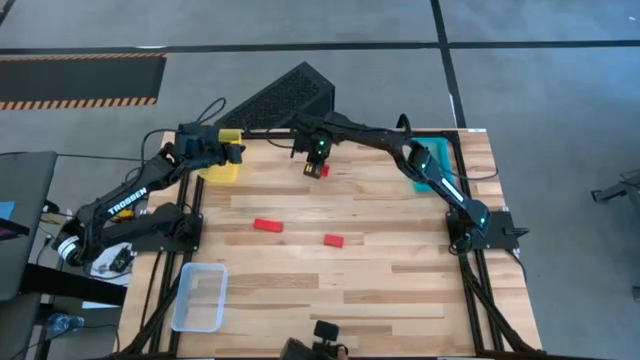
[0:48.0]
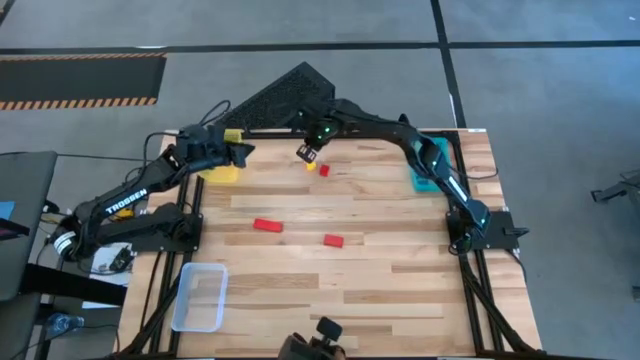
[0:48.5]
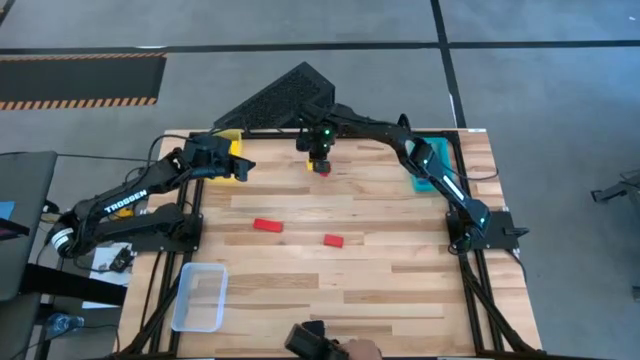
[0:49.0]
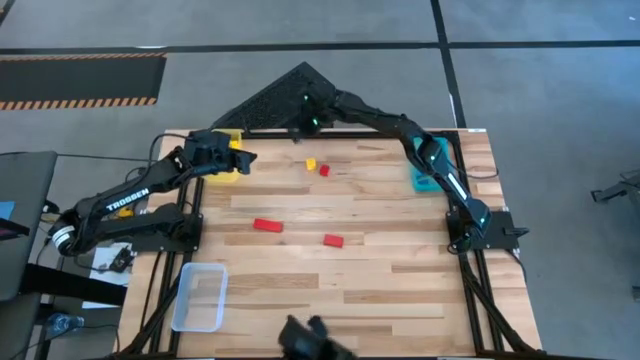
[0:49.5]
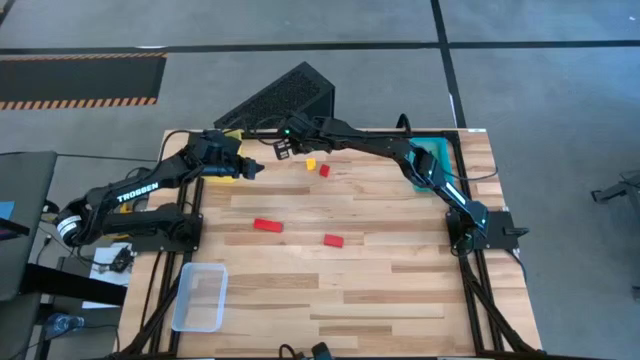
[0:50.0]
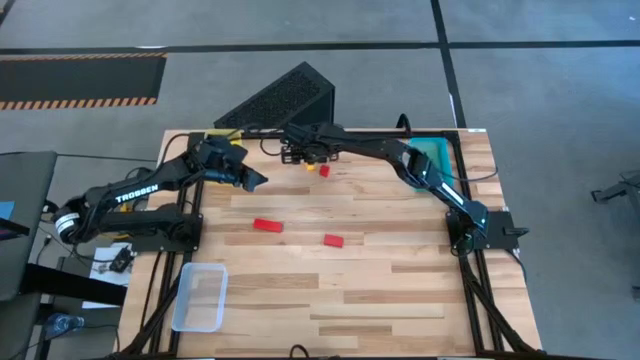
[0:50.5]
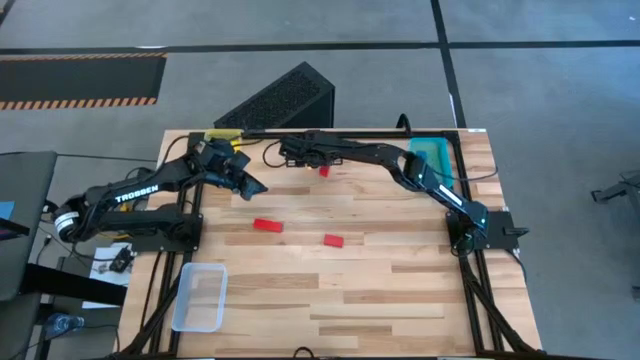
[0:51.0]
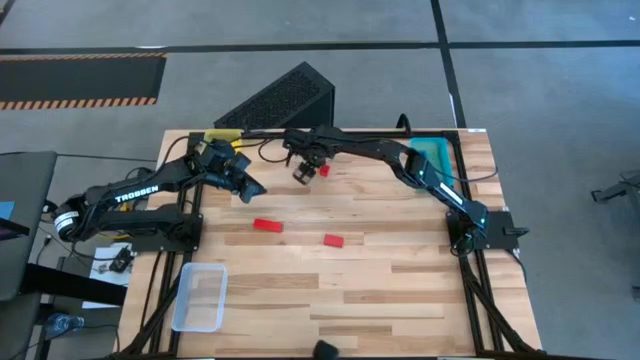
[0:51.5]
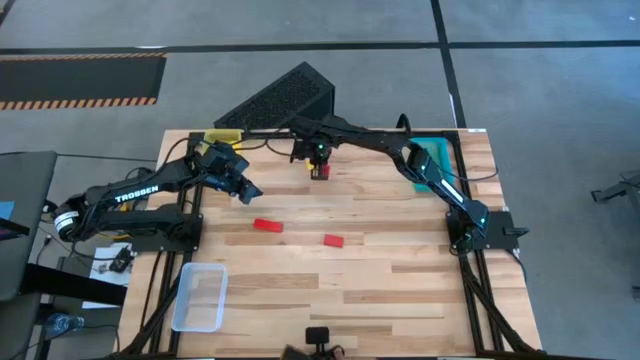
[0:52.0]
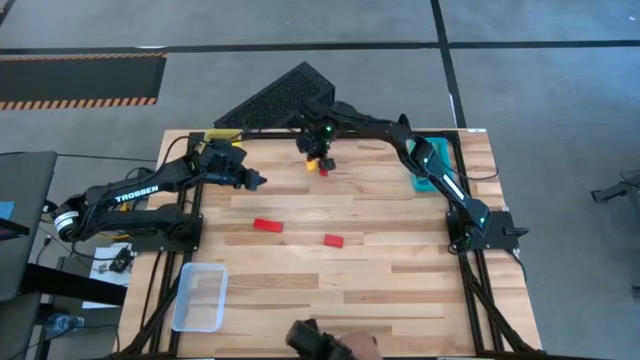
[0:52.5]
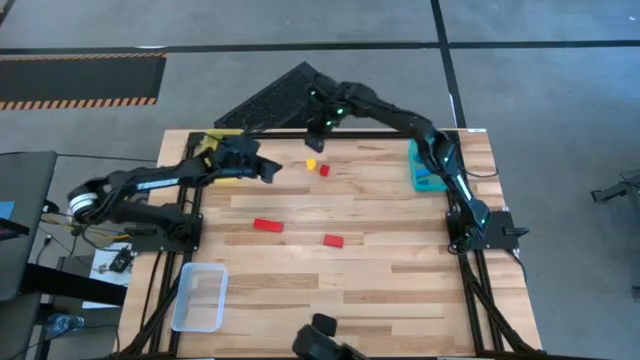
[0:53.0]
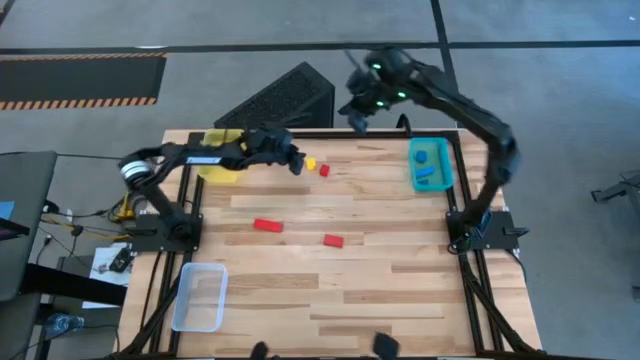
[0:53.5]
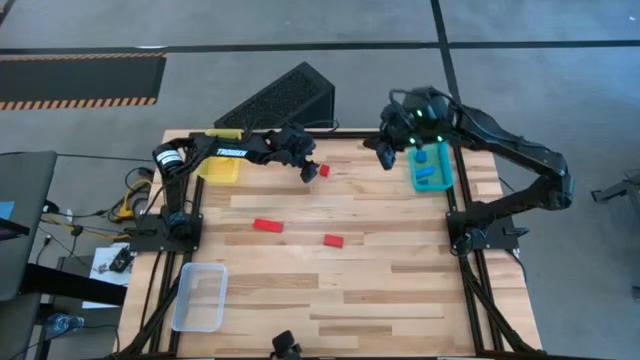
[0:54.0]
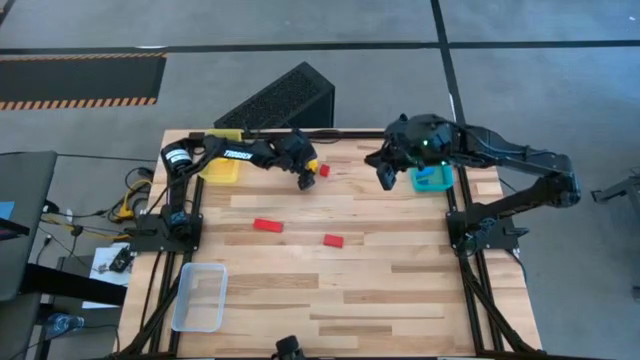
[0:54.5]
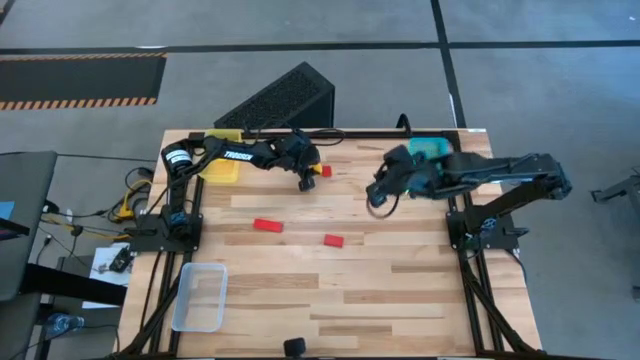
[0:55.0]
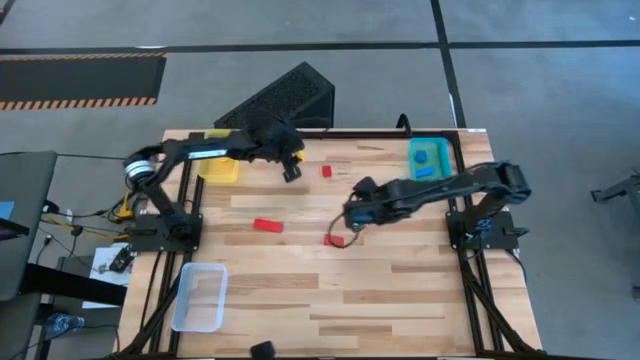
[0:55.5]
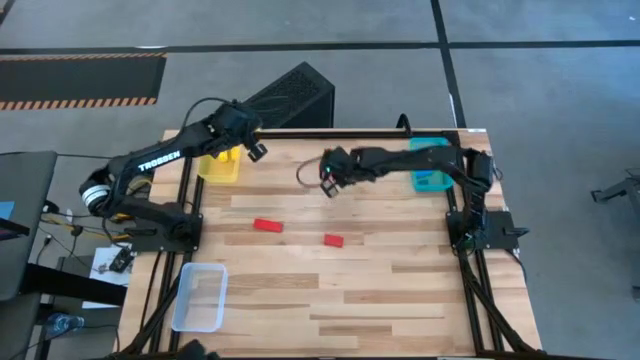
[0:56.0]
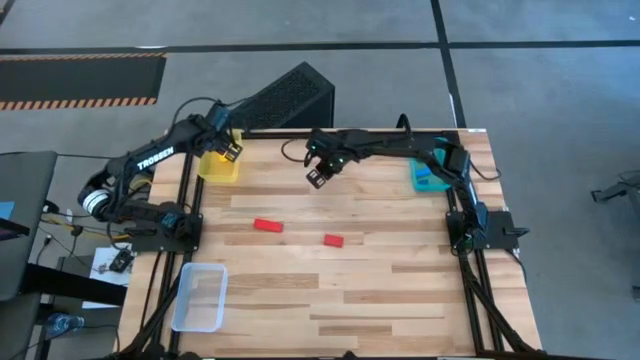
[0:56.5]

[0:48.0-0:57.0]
Task: Sort & place blocks by color
Put the yellow square wooden block into the yellow bin

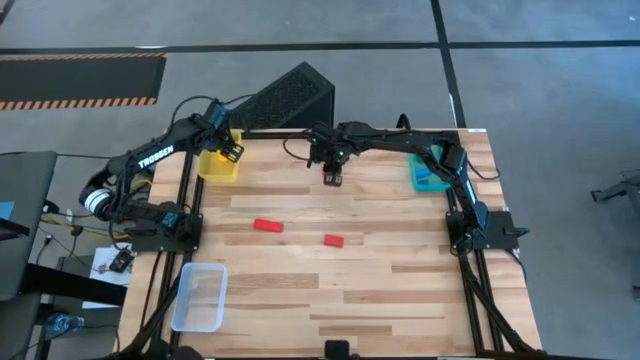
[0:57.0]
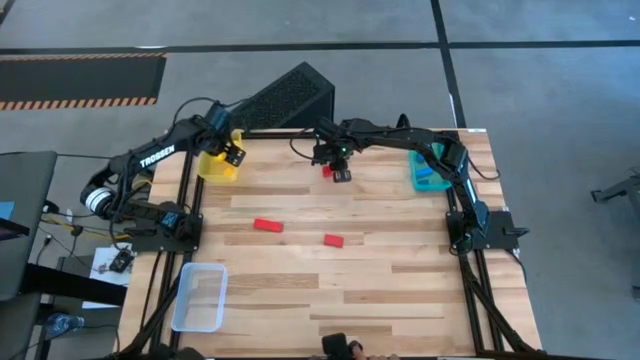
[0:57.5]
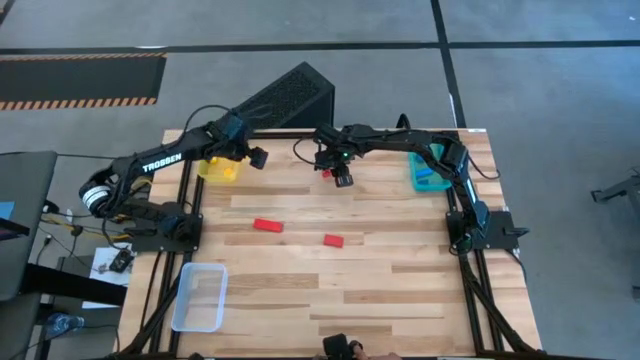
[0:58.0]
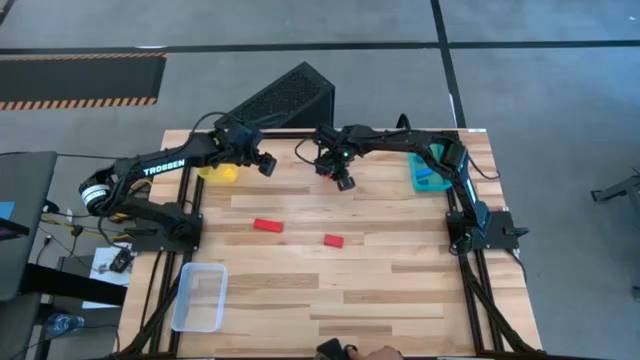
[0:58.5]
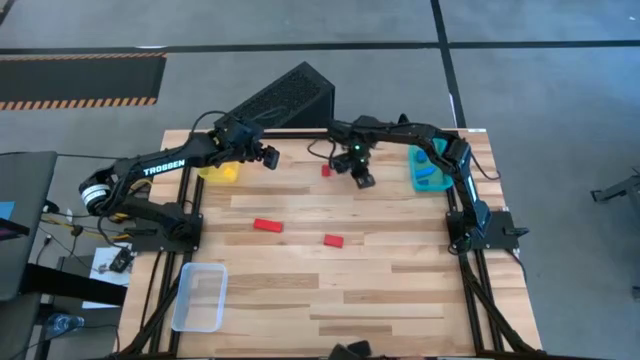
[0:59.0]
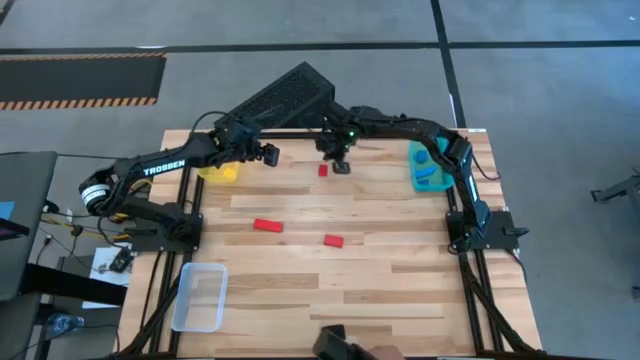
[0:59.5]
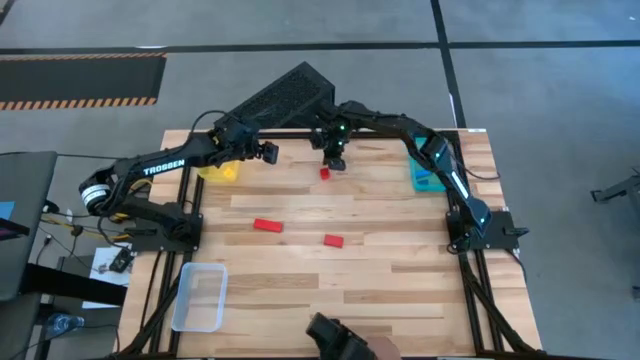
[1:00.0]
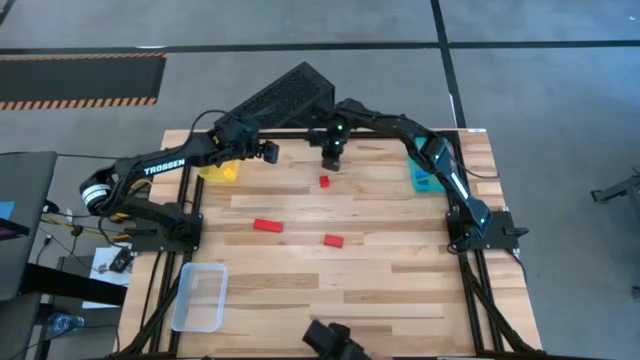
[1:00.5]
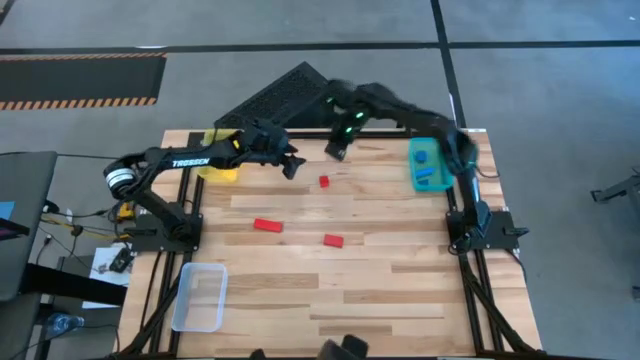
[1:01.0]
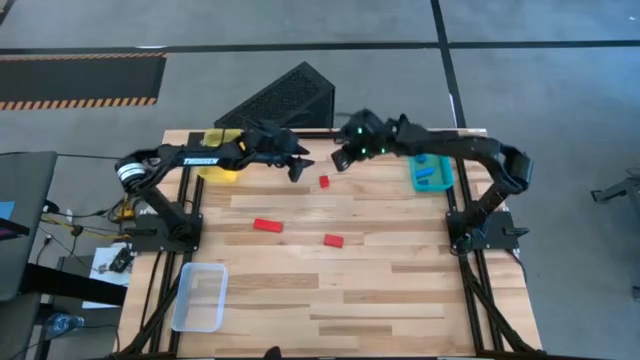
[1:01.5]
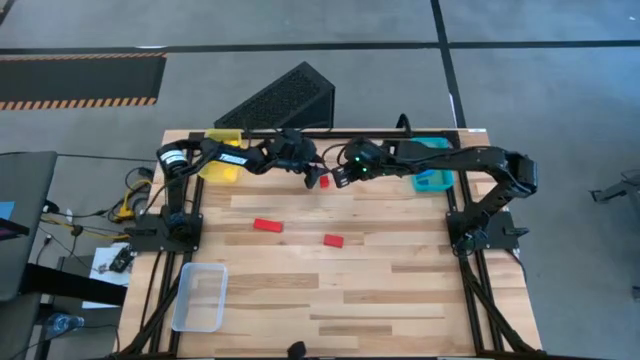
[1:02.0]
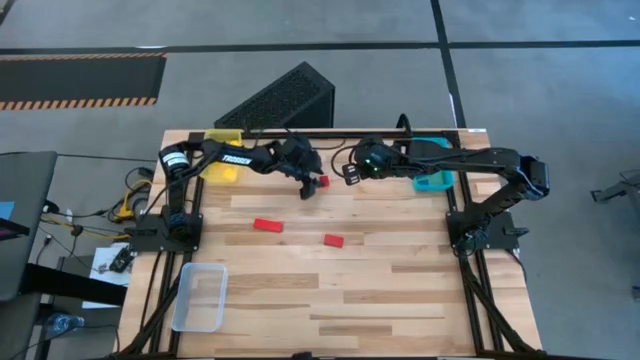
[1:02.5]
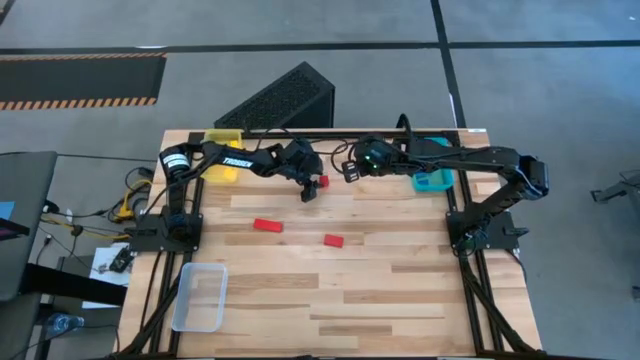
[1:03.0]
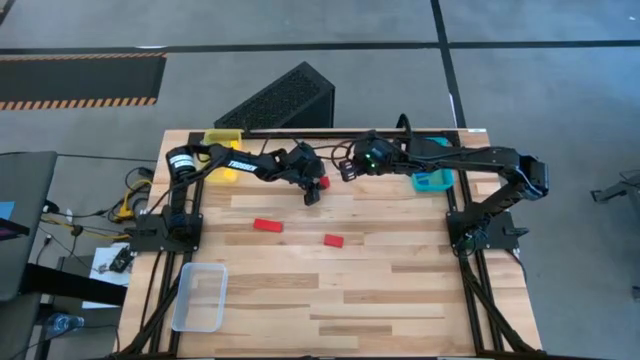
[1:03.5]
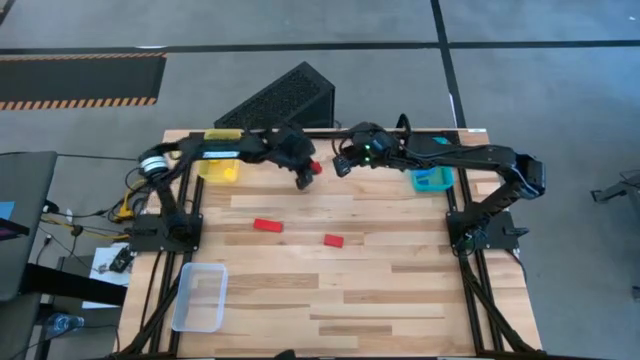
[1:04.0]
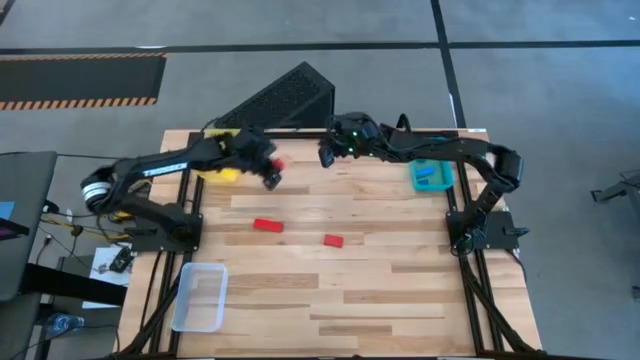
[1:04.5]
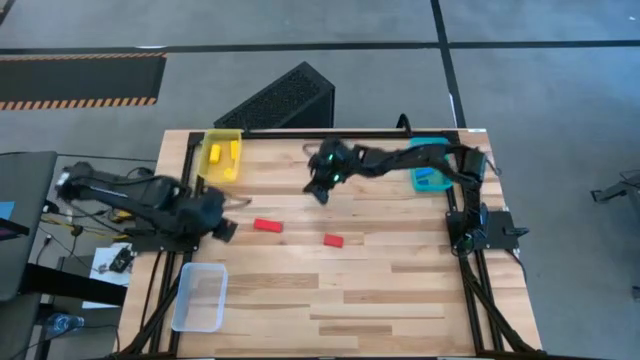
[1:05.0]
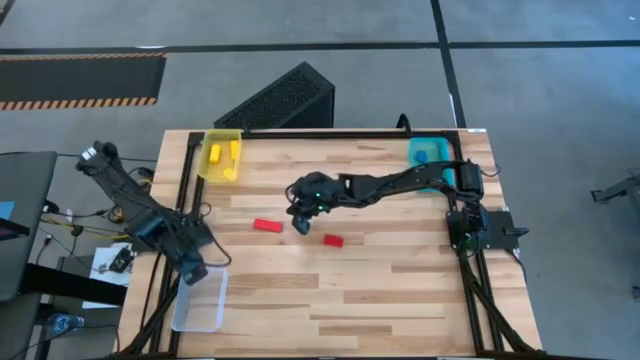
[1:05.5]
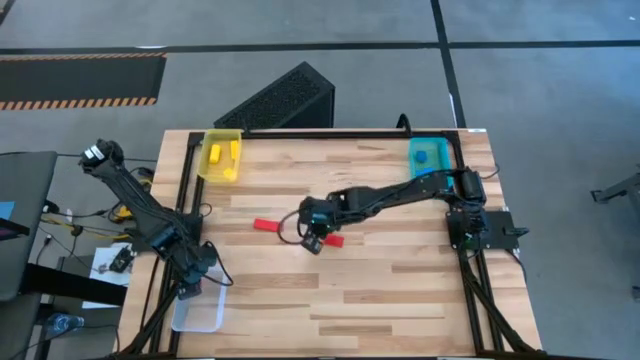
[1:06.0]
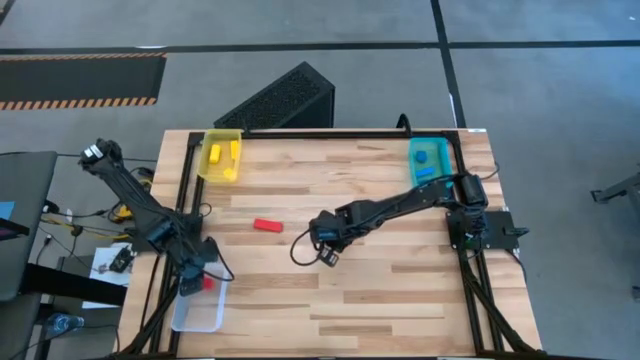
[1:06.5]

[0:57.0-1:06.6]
Put the red square wooden block into the transparent bin

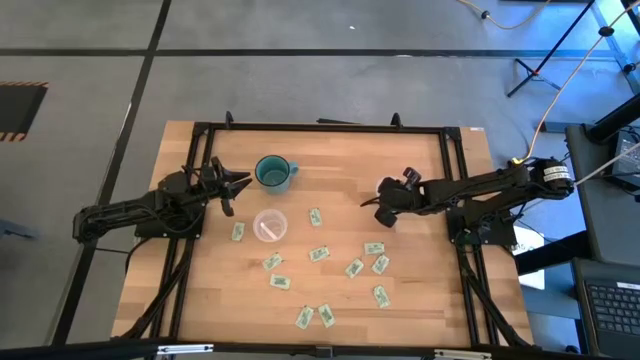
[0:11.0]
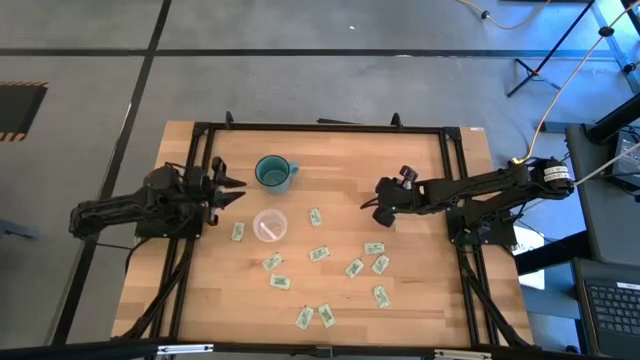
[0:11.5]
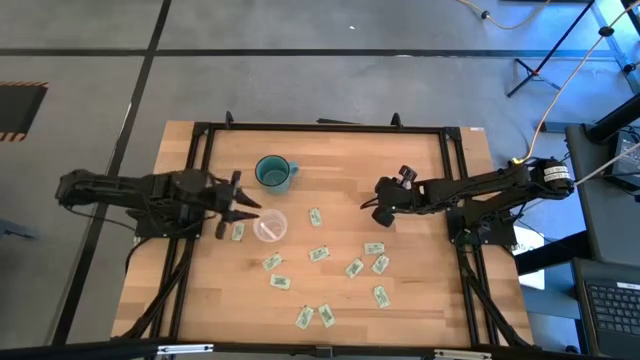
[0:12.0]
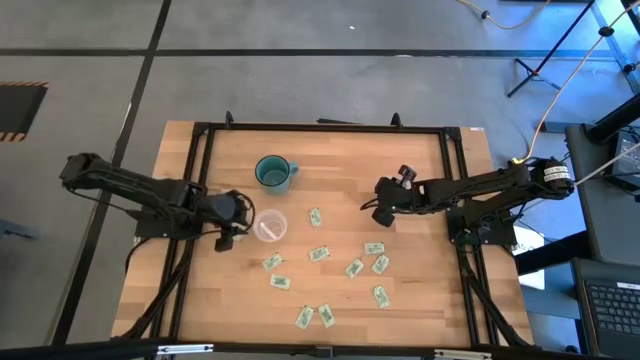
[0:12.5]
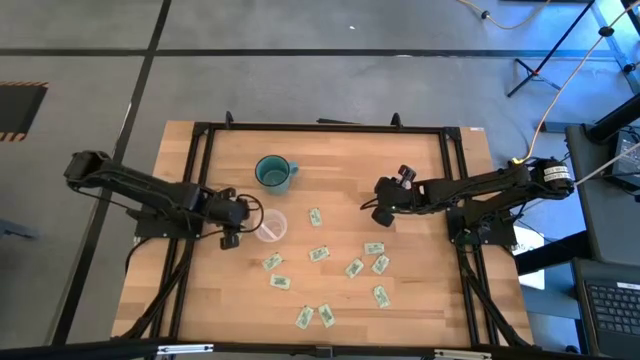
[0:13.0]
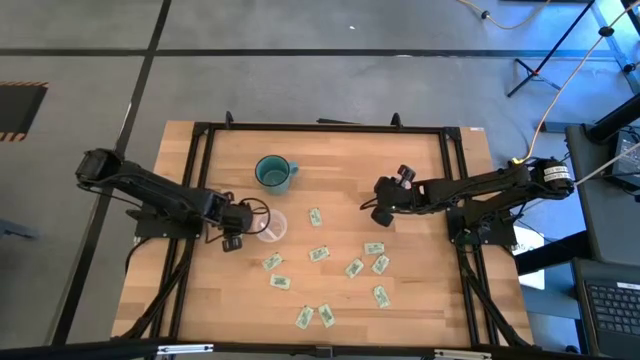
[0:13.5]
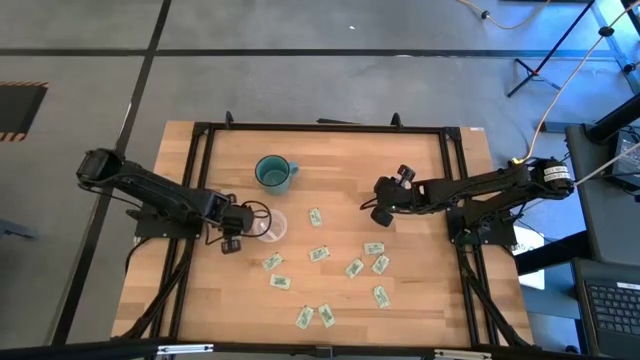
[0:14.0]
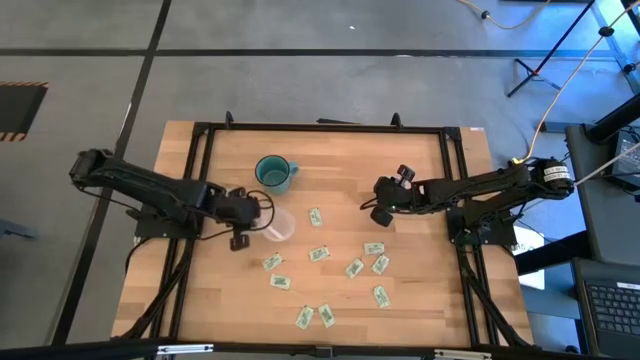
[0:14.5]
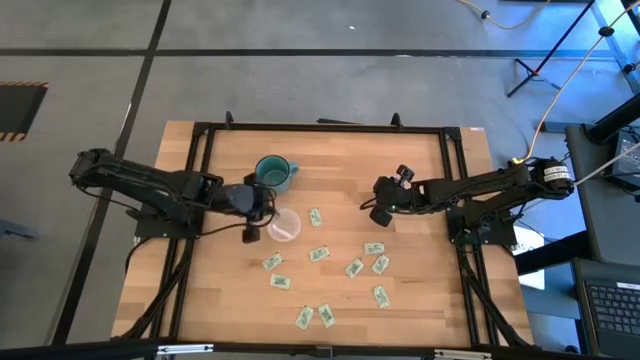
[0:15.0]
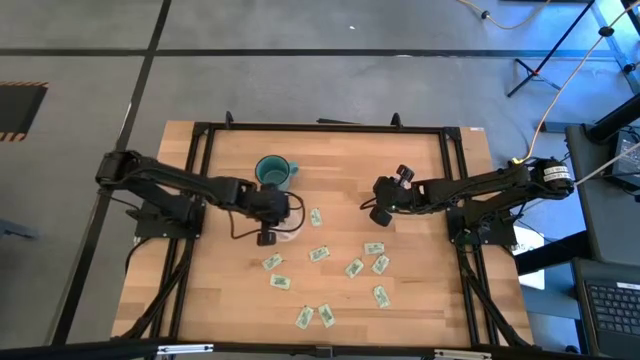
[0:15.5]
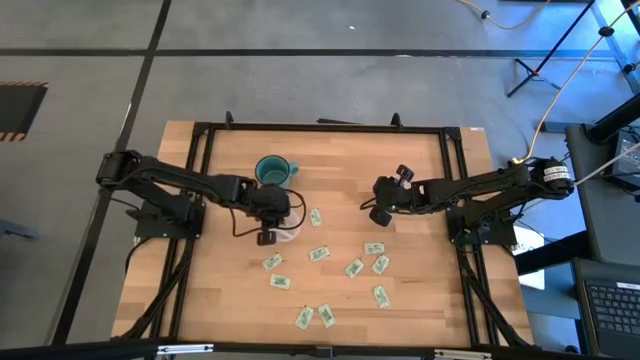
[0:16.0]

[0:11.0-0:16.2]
Task: Pick and place Stevia / Truvia into bins
Put the white stevia packet into the left transparent container
